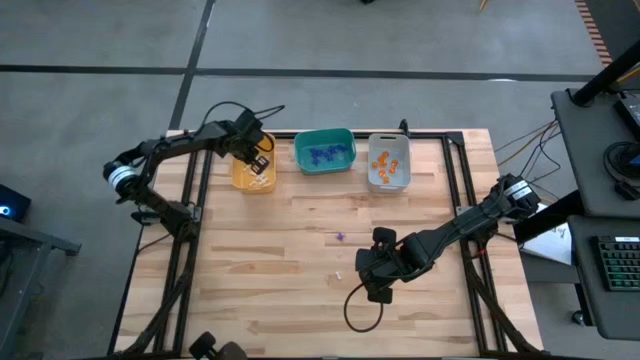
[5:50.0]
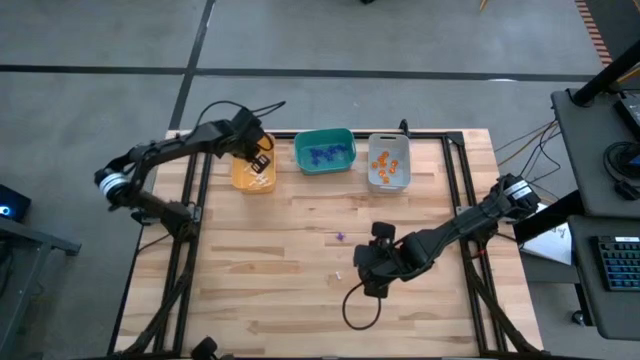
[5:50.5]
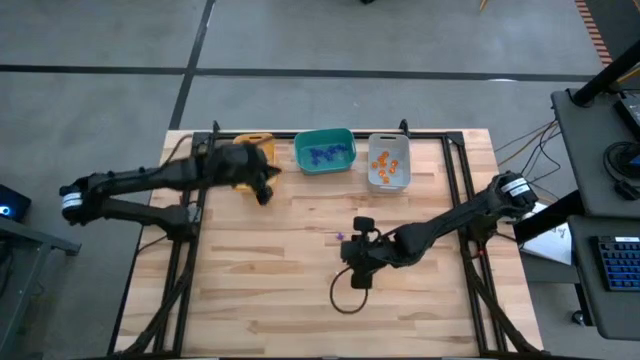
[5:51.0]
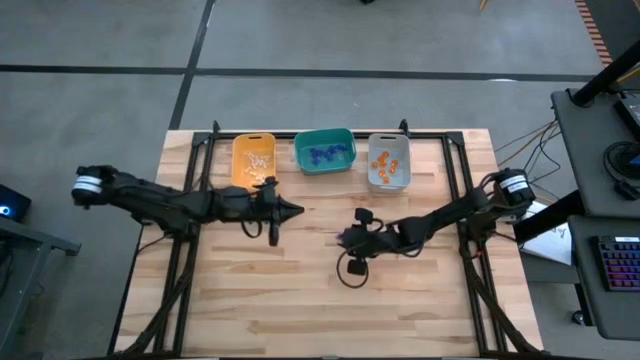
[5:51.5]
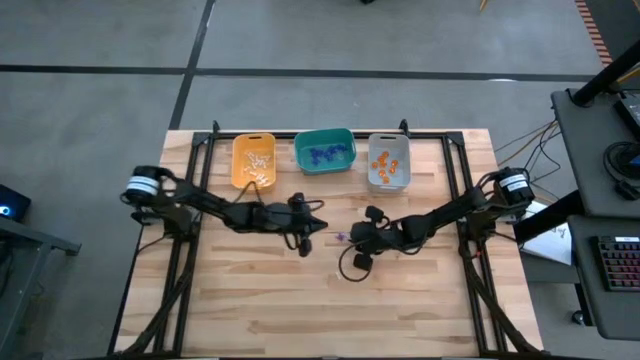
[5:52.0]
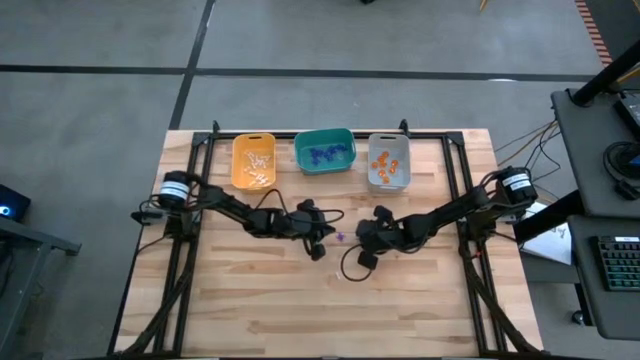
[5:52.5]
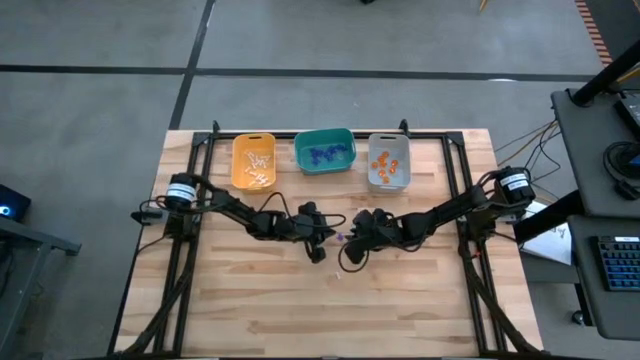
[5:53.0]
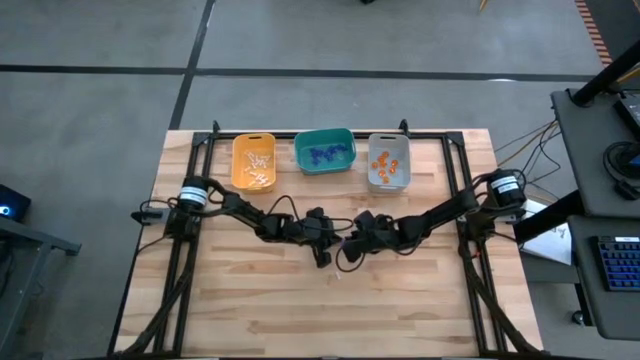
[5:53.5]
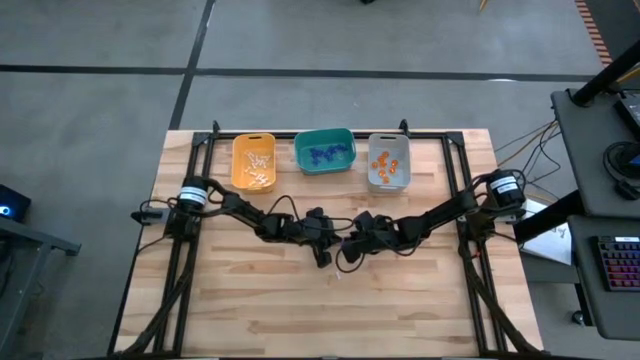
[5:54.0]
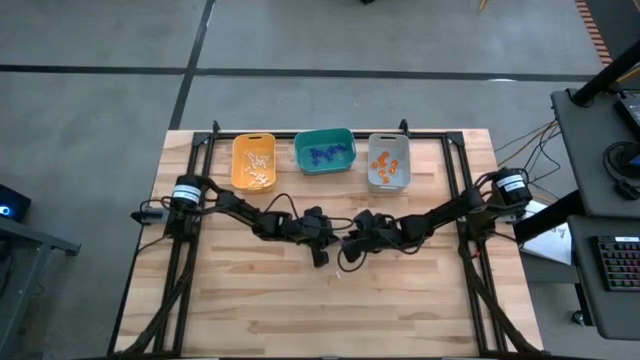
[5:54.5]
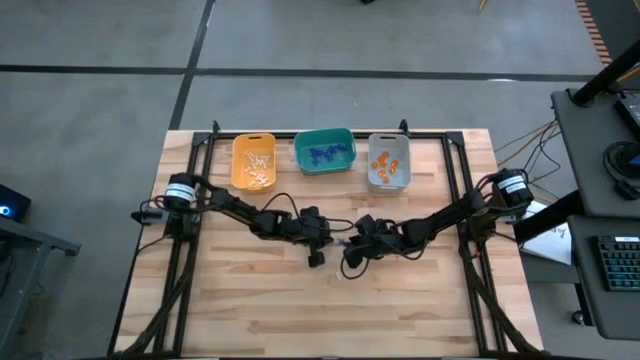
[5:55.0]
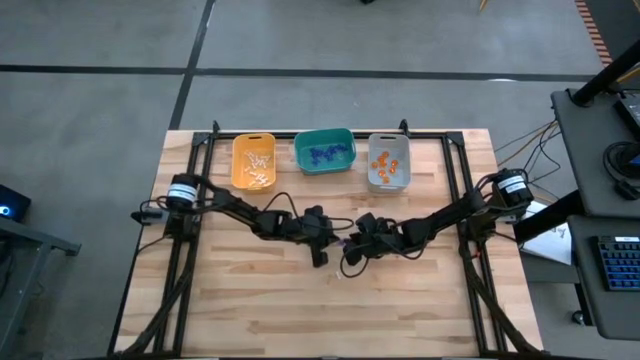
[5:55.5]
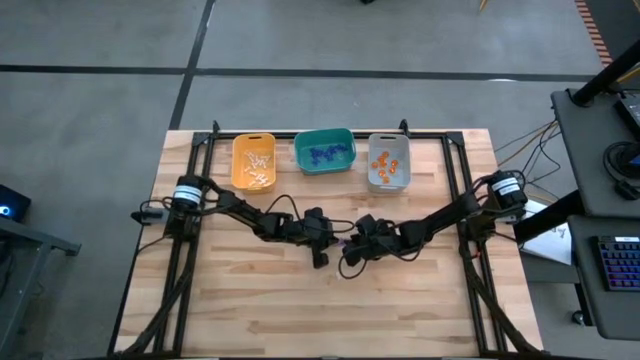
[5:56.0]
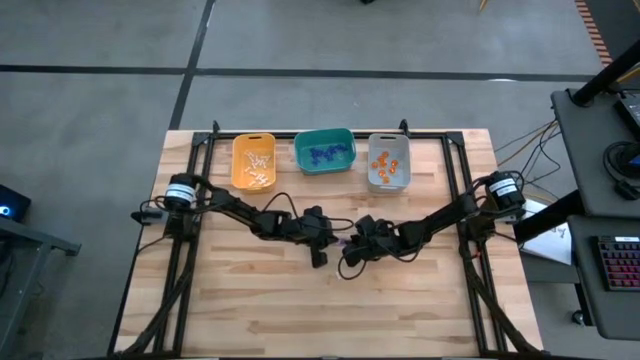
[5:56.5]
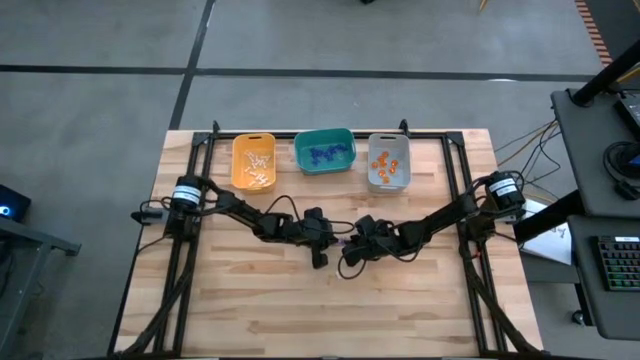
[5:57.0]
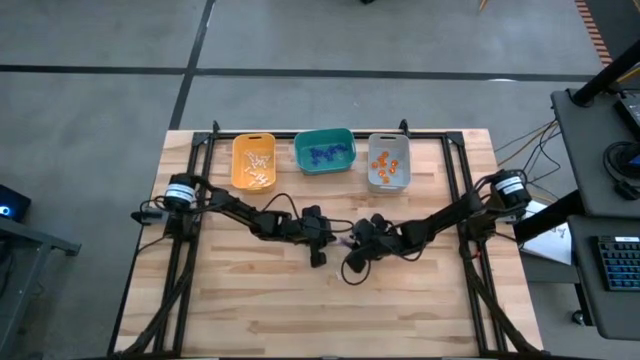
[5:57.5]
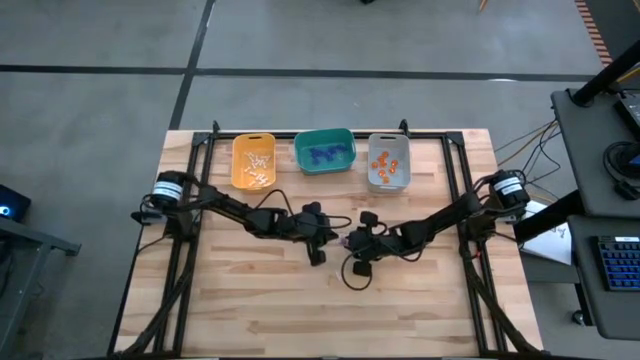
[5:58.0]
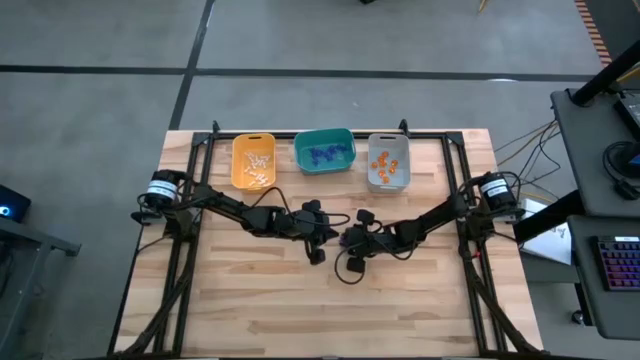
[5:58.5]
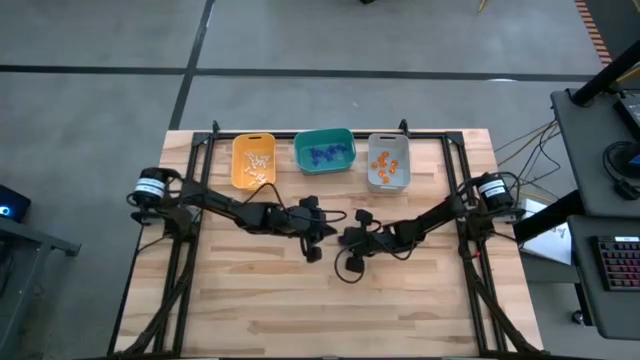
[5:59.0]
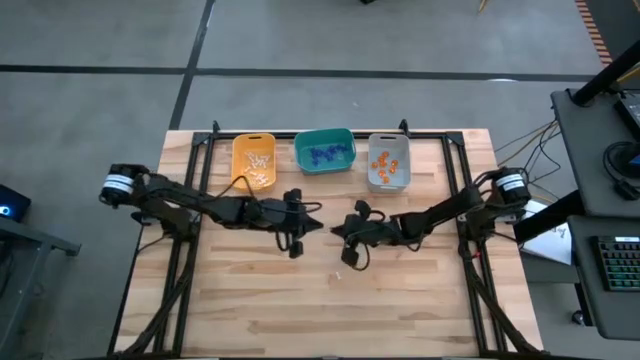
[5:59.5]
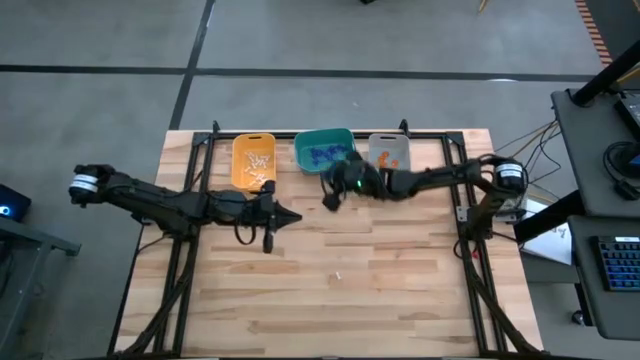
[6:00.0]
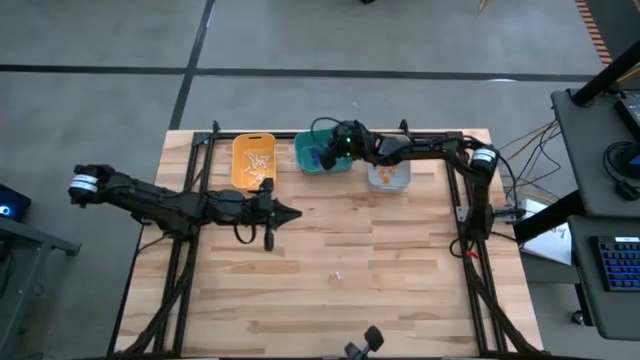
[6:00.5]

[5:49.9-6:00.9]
Task: Sort Halloween decoration
Put the violet spider toy into the green bin

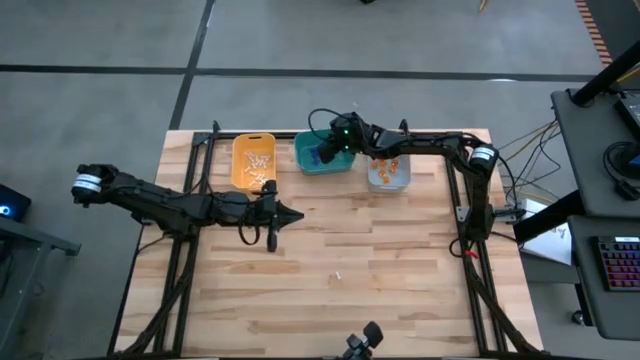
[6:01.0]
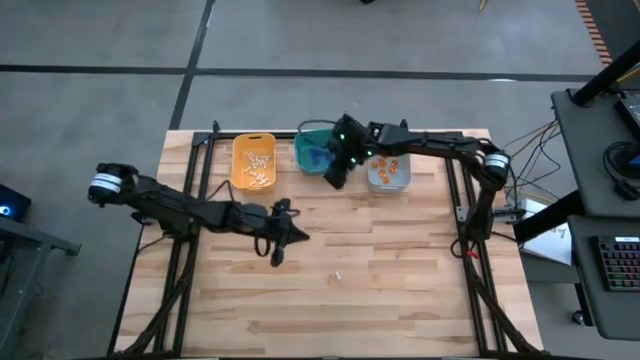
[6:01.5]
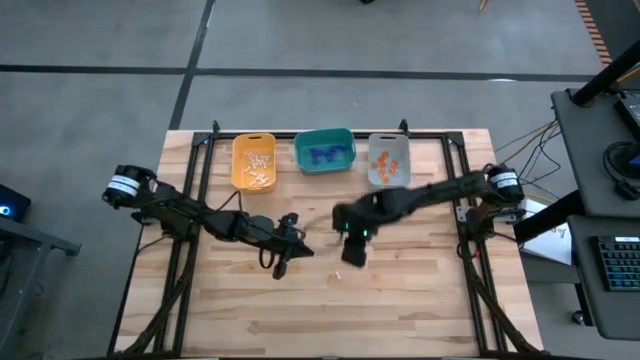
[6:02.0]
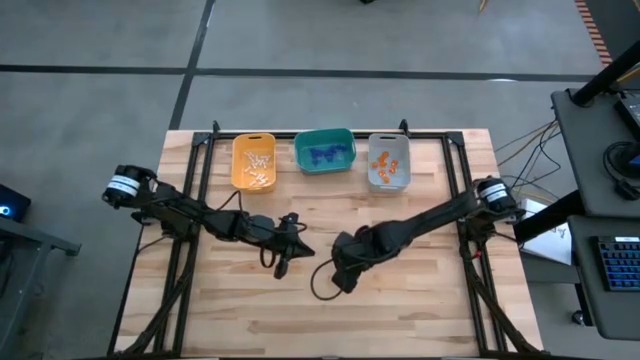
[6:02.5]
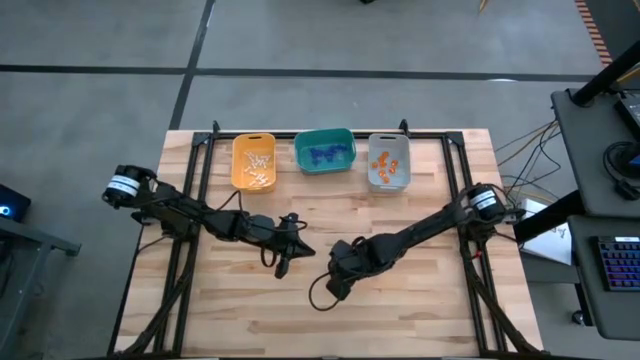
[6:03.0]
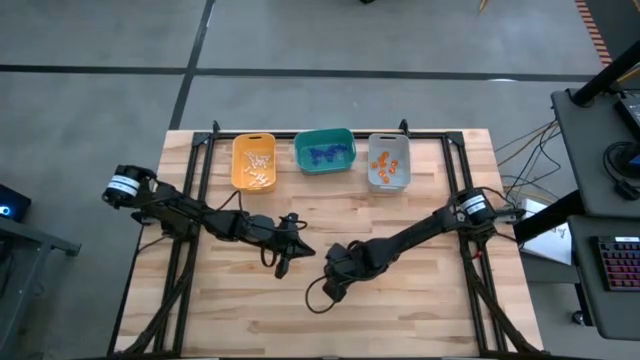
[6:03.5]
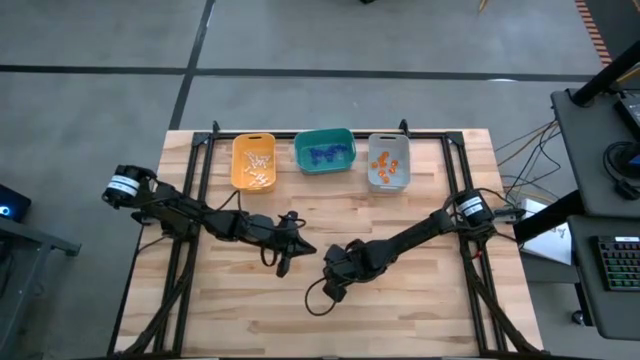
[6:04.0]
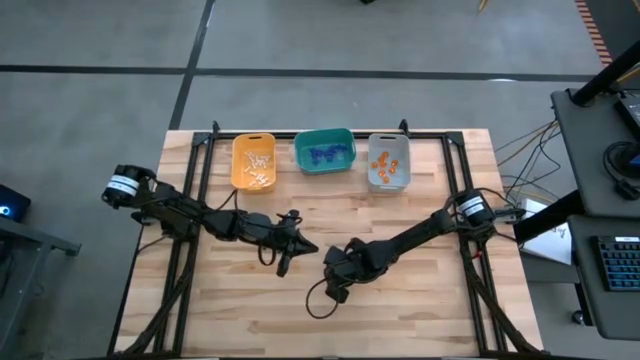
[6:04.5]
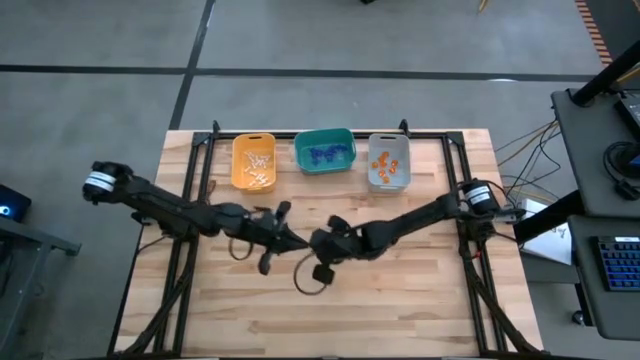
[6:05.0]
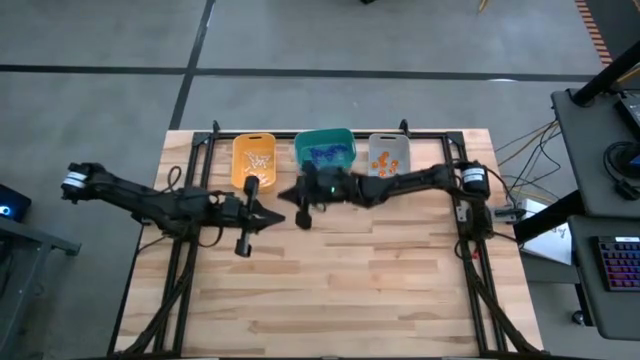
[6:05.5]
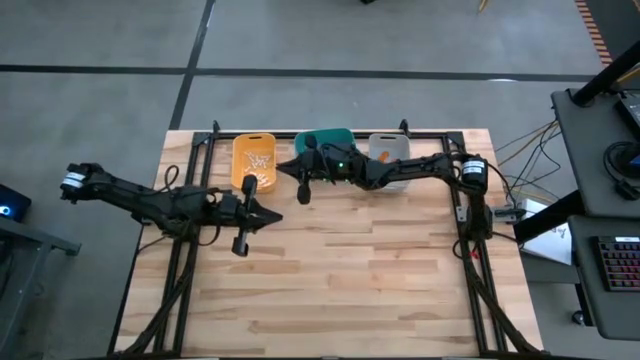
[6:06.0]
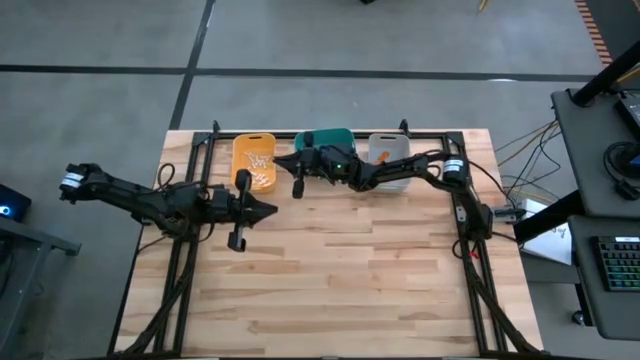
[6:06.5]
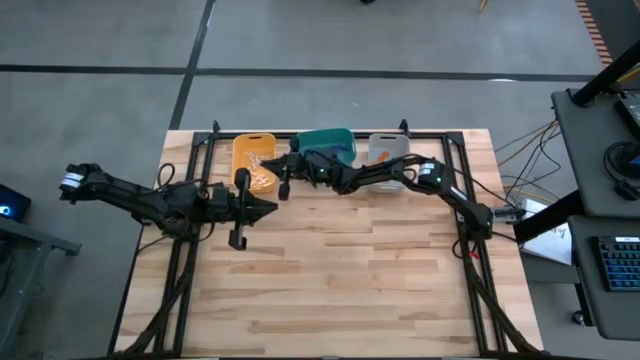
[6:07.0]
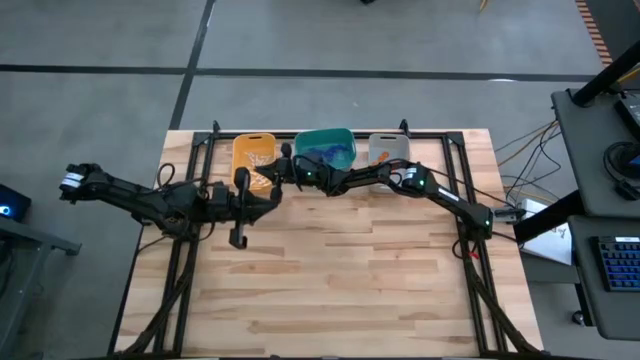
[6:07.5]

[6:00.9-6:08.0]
Put the white bone toy into the yellow bin

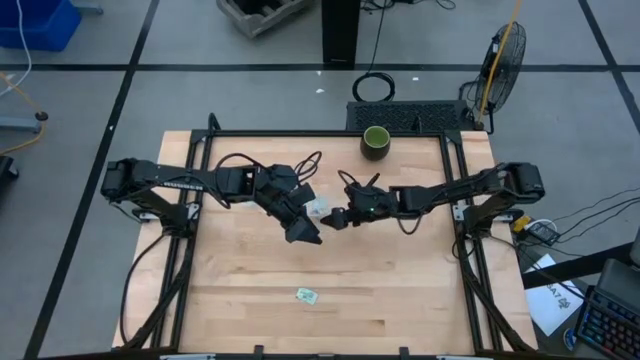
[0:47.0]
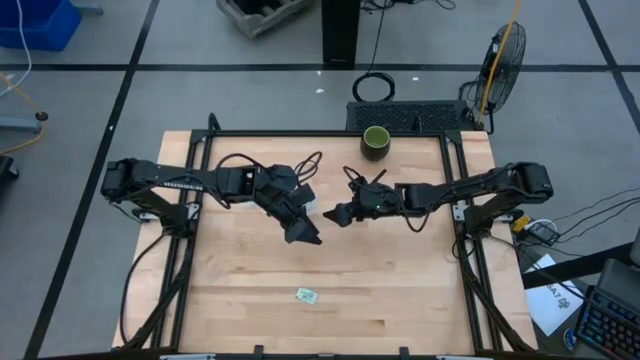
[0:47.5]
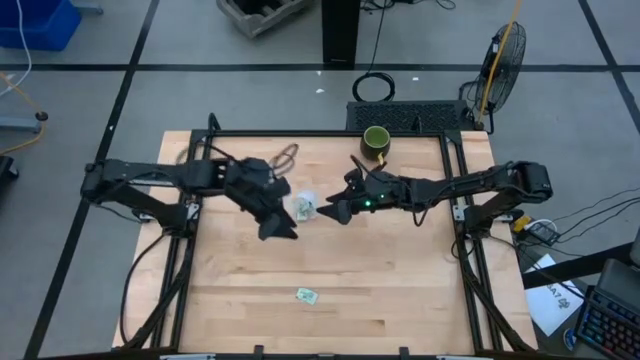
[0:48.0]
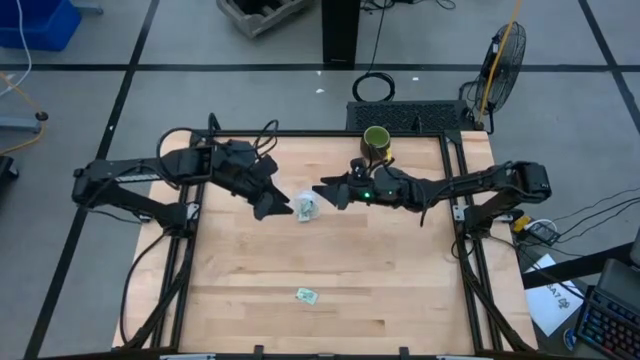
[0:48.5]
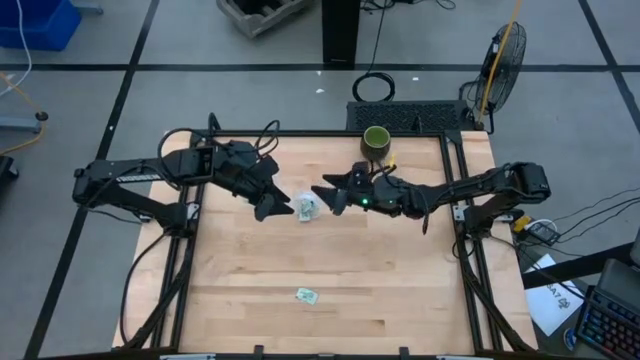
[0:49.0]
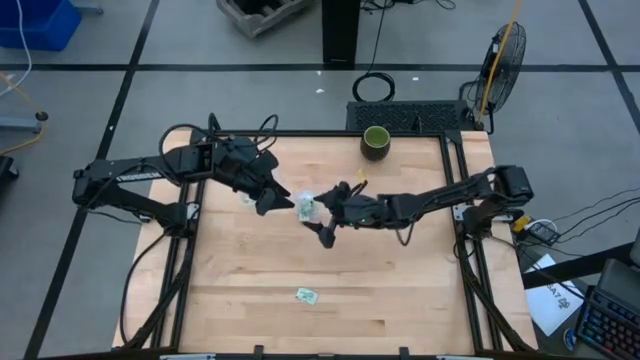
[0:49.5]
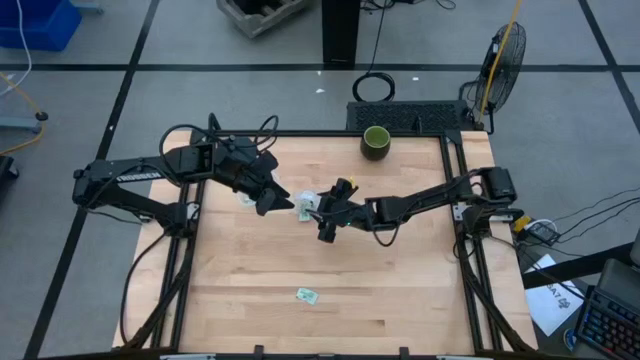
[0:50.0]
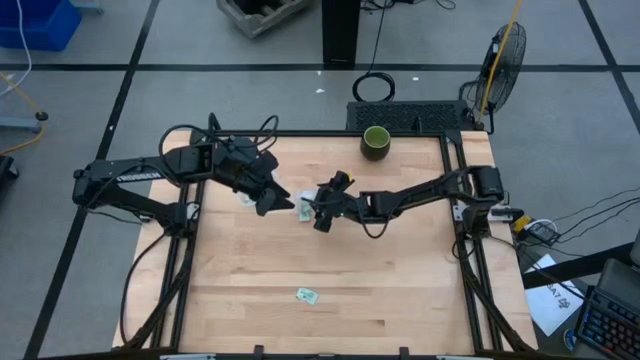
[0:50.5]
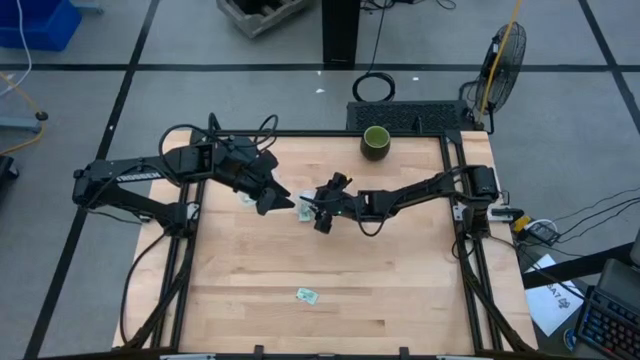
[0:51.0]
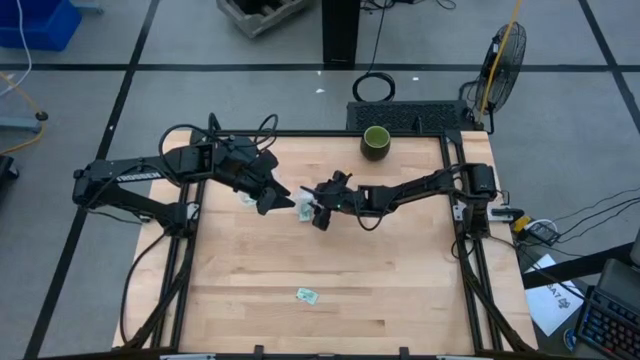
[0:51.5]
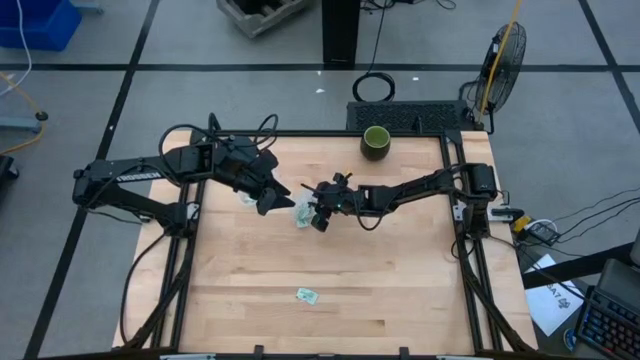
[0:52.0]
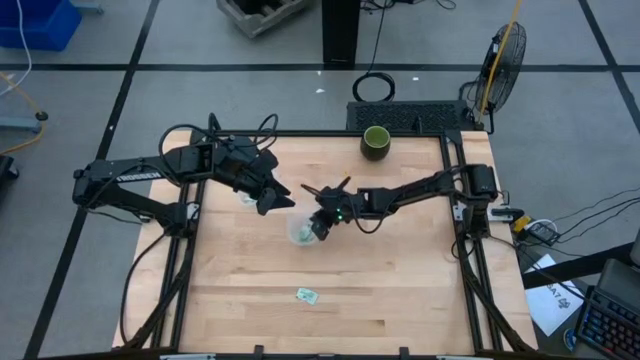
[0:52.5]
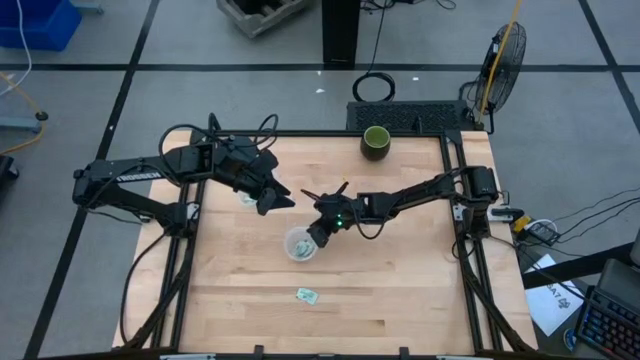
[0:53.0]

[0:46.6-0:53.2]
Task: Pick and place items into bin
Adjust the right transparent bin
